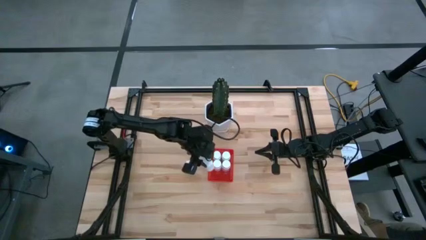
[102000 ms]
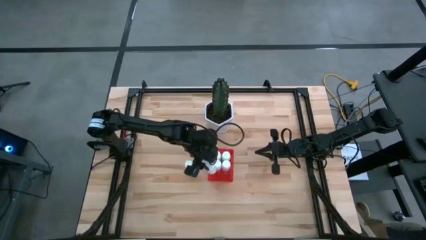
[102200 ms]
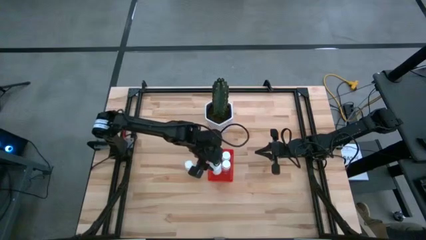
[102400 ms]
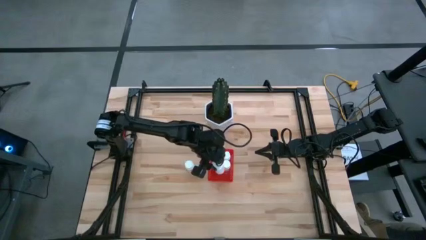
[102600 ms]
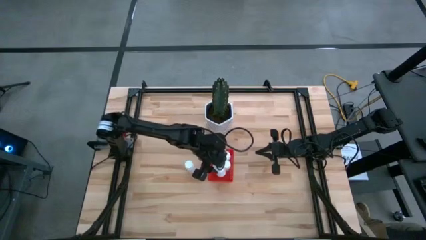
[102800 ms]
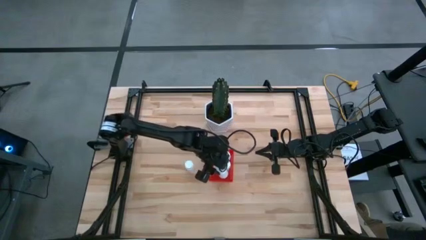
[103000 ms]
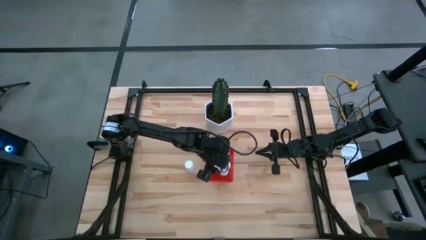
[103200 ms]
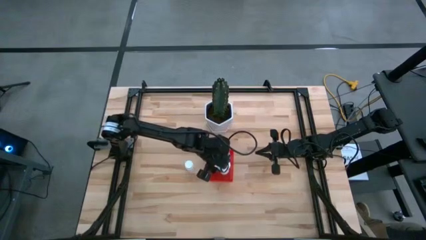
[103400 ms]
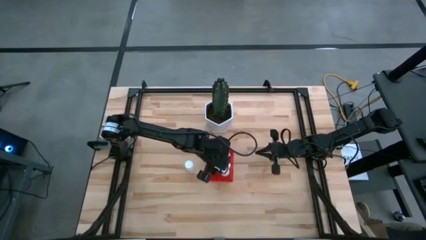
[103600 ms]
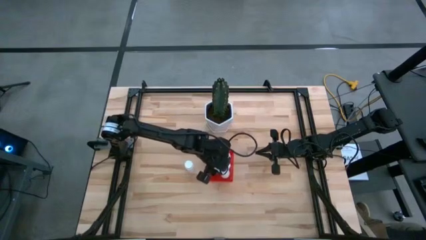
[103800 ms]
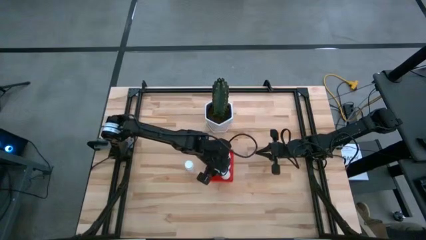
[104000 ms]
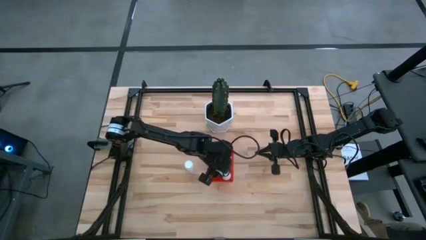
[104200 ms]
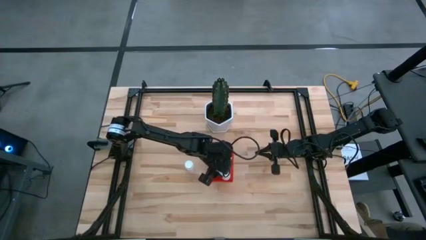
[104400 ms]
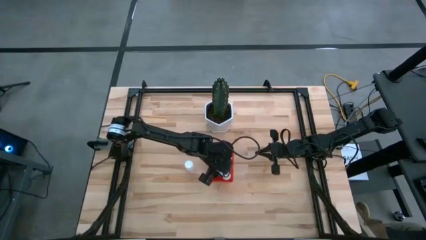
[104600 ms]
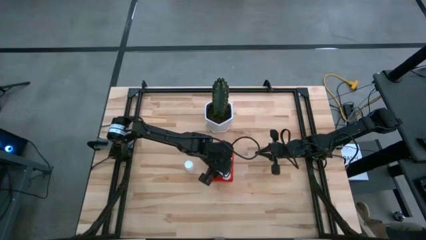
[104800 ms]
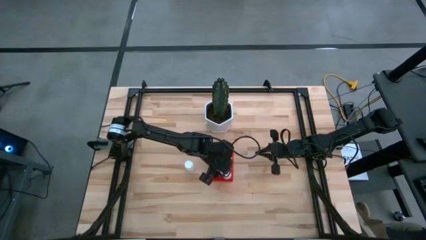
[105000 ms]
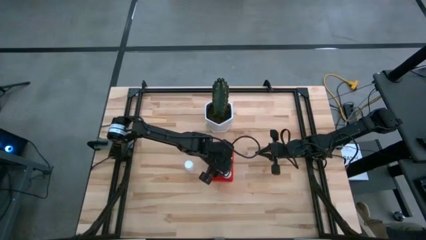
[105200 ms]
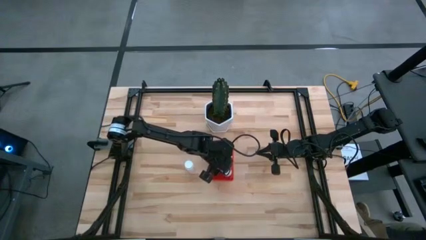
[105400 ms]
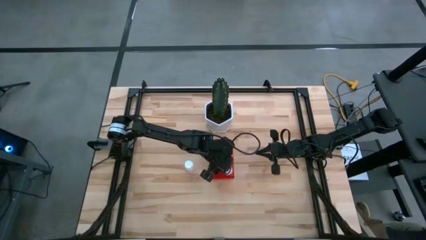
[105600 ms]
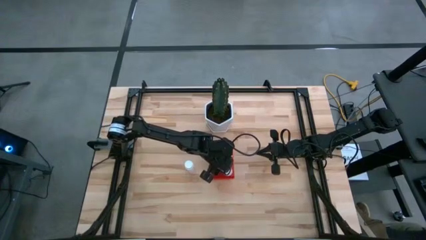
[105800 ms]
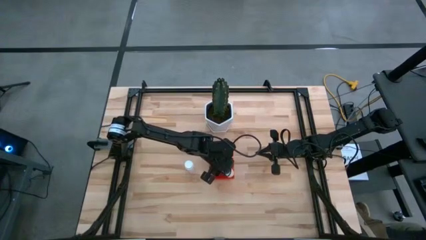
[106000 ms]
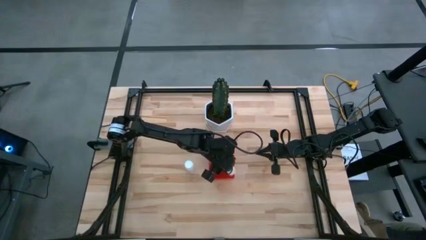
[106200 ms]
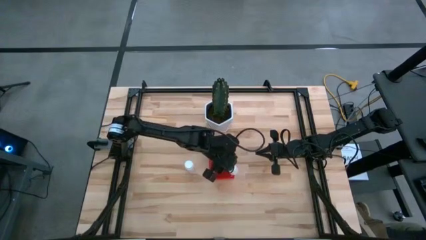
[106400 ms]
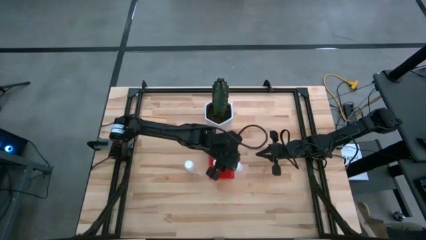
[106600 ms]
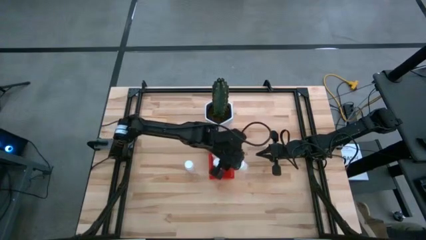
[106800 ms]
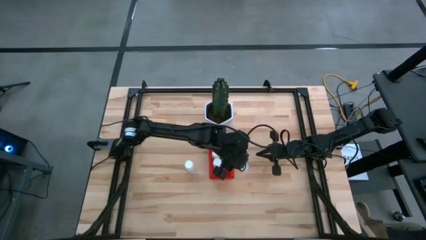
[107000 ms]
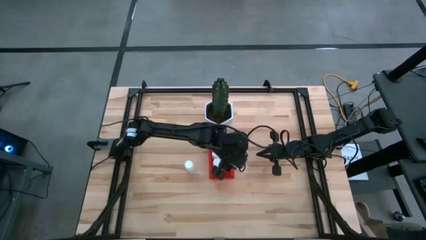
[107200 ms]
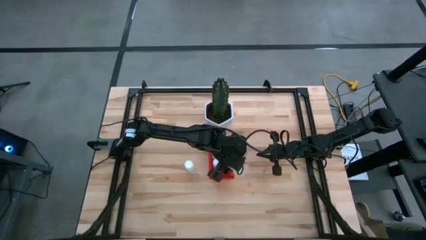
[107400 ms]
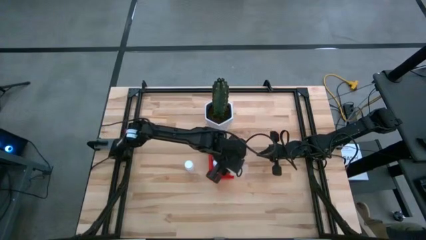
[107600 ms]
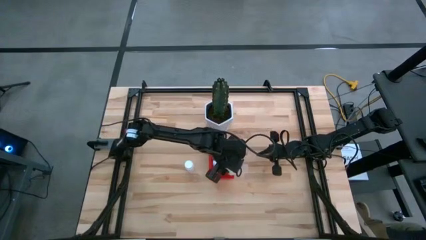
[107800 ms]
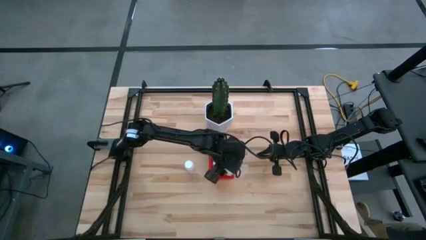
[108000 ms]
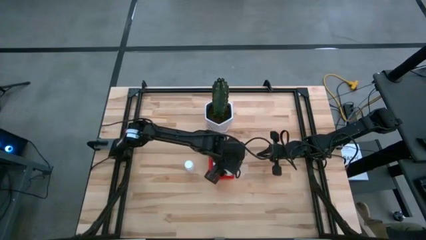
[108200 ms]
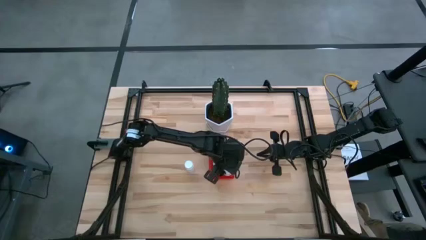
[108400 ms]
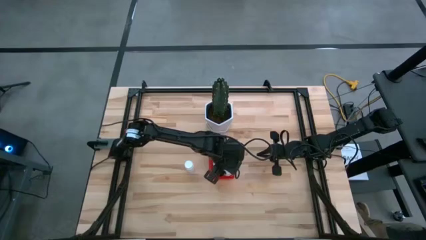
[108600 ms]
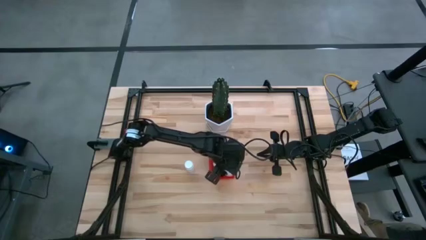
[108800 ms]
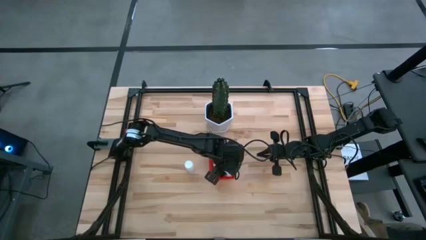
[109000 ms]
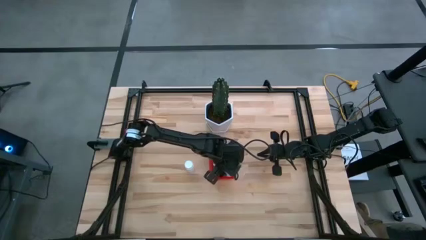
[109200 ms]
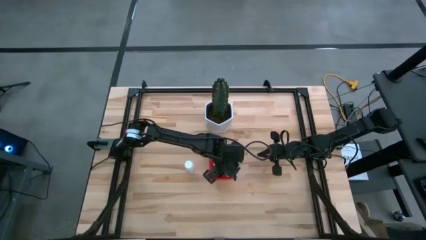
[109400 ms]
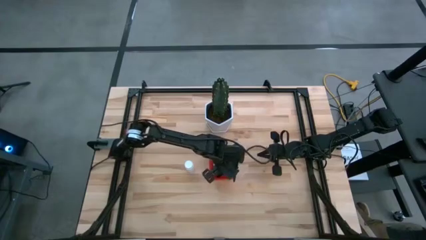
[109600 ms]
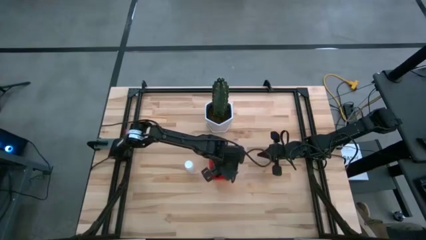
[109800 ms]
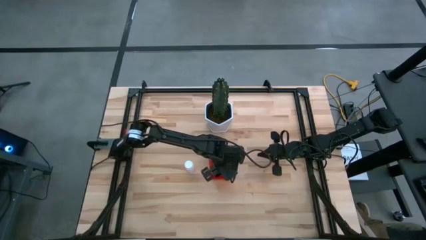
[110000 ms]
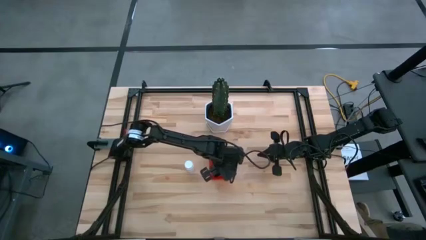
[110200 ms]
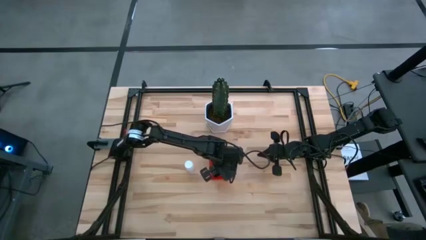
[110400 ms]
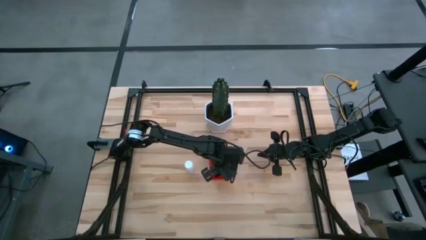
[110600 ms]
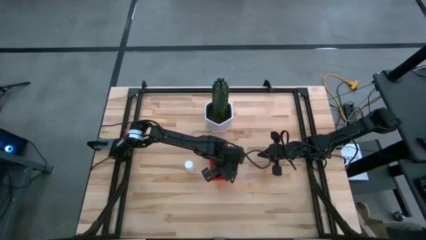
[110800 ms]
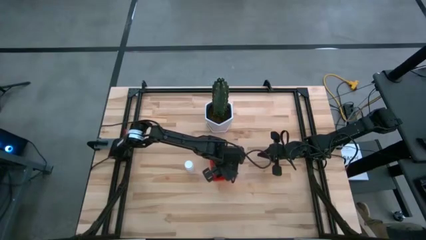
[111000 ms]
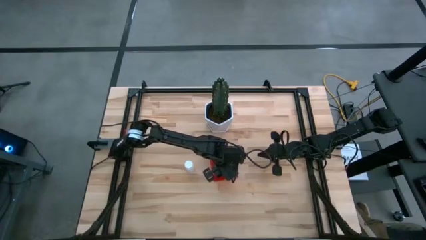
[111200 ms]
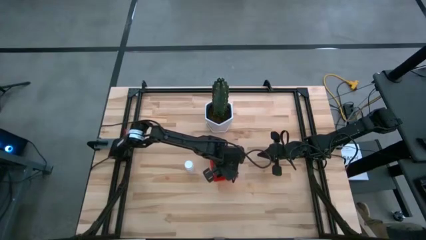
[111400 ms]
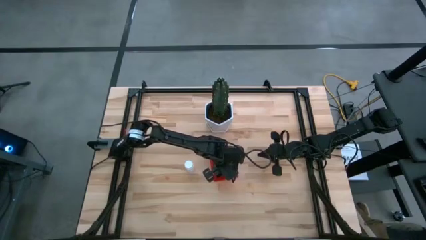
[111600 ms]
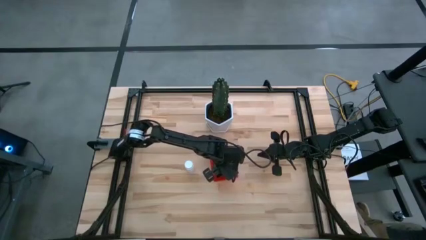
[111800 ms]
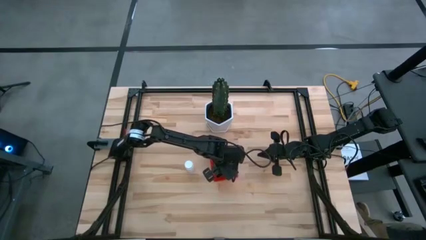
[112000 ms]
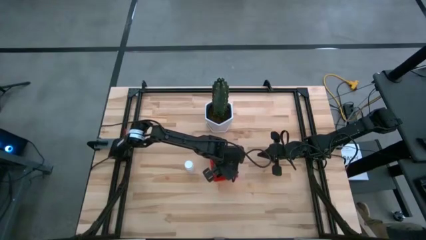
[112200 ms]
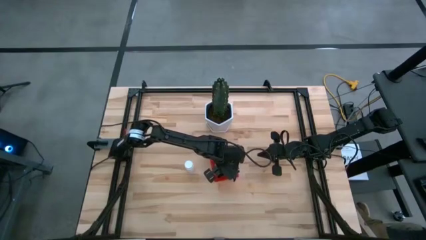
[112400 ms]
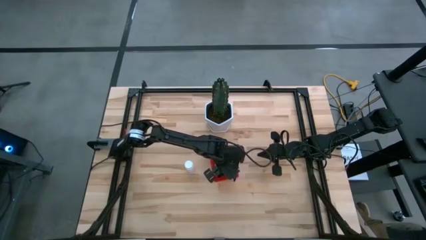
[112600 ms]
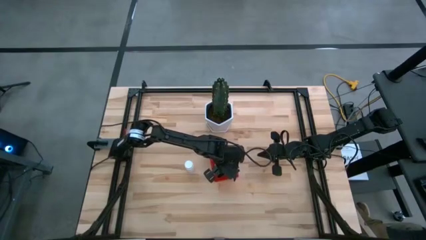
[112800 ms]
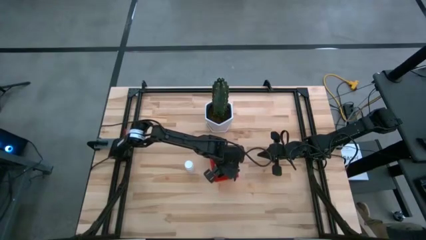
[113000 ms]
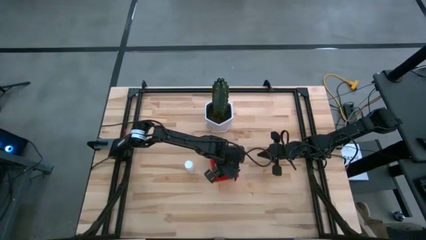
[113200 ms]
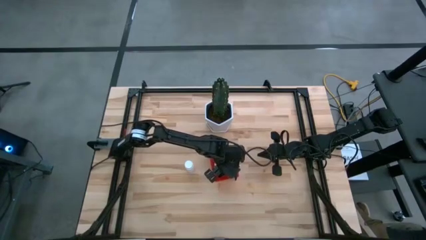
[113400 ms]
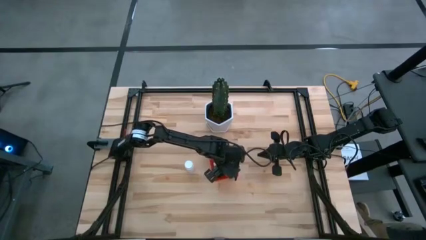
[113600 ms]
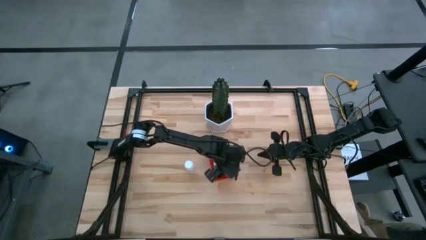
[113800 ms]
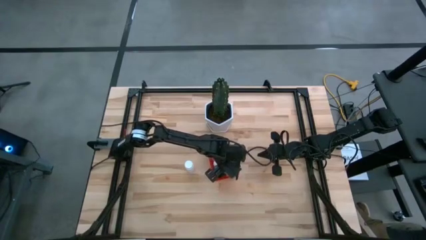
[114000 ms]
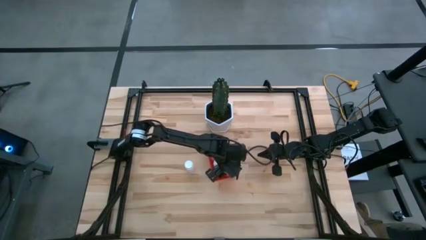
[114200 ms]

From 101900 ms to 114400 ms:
Task: Pick and place pill bottles into a basket
Put the white pill bottle into the red bin

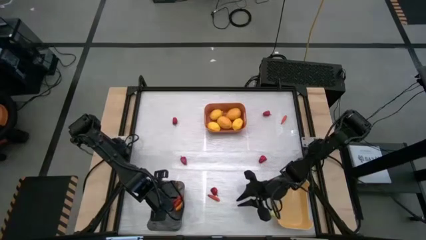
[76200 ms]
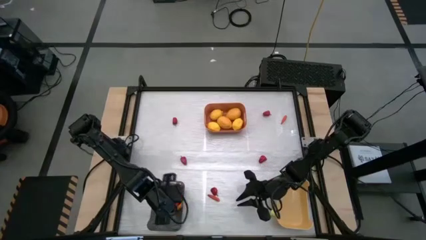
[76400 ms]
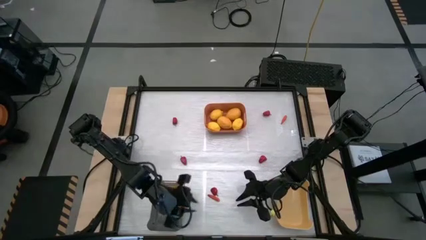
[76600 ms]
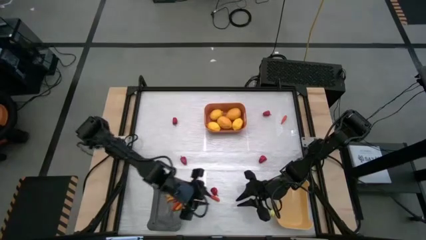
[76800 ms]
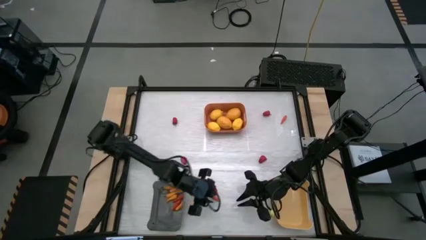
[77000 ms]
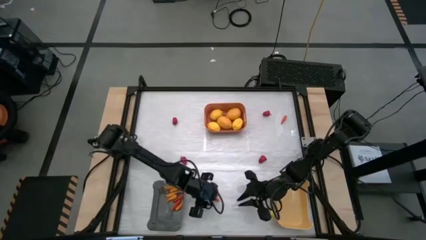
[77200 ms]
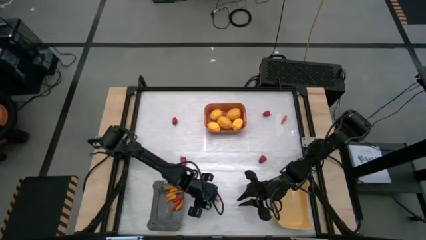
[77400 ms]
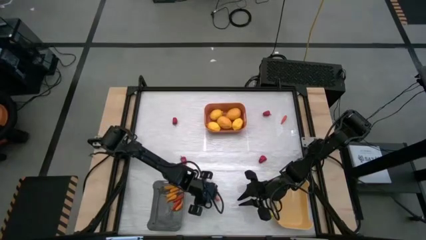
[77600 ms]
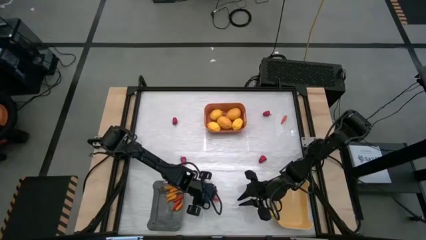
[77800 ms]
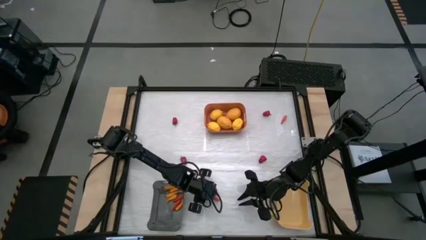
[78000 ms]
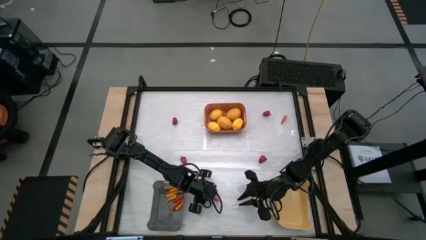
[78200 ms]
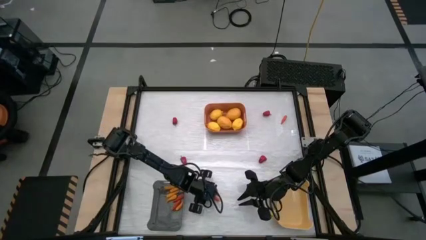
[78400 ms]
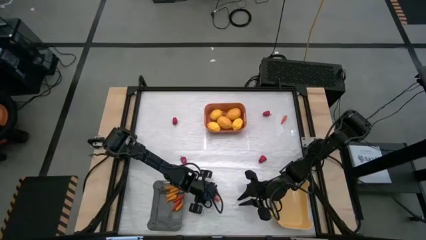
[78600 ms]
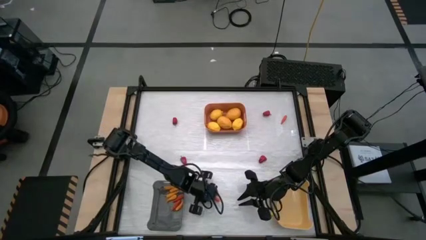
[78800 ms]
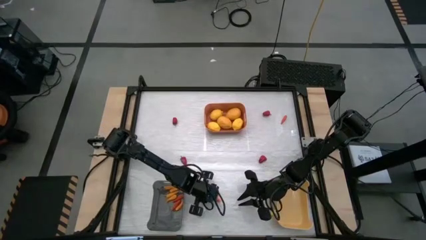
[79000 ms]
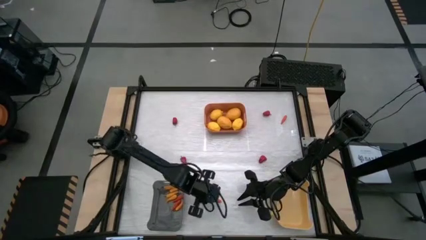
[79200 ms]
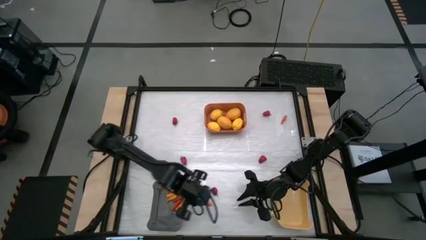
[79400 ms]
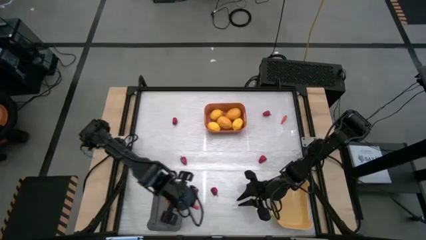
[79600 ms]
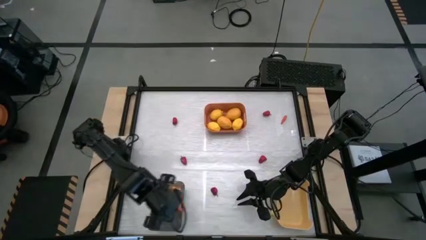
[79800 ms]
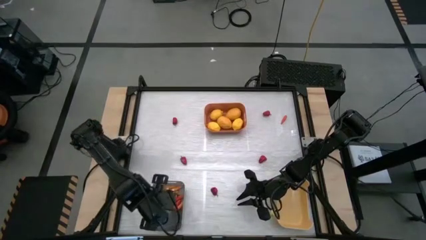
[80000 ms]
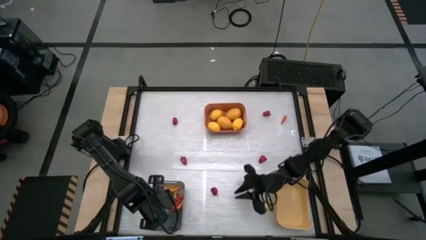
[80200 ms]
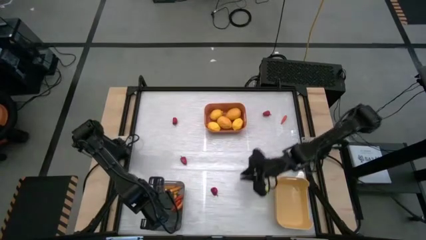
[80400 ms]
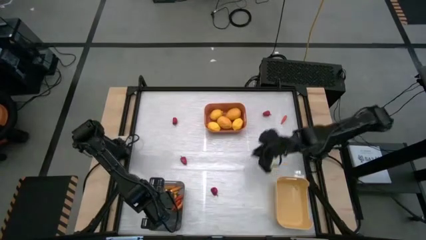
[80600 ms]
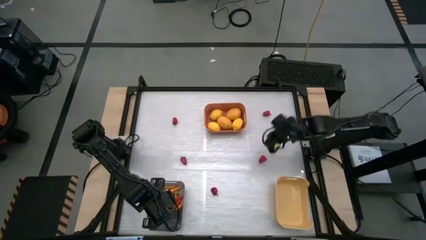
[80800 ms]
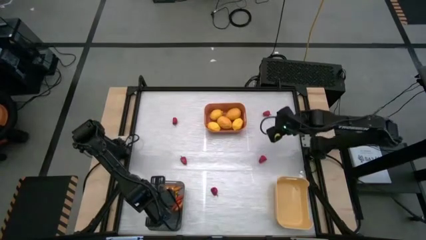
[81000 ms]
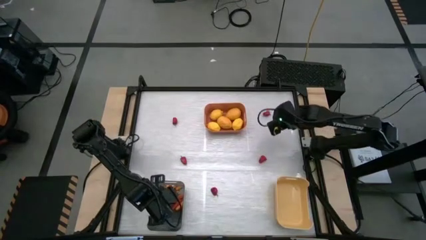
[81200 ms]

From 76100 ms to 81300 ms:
Task: Sort produce into baskets
Put the orange chili pepper into the black bin
